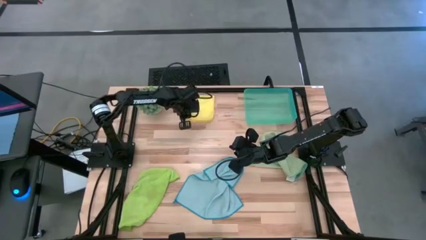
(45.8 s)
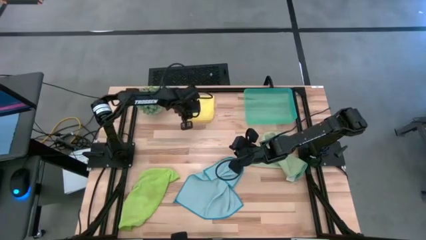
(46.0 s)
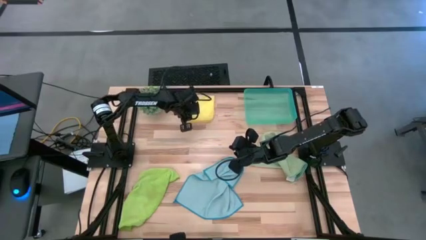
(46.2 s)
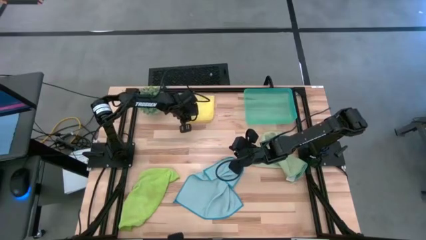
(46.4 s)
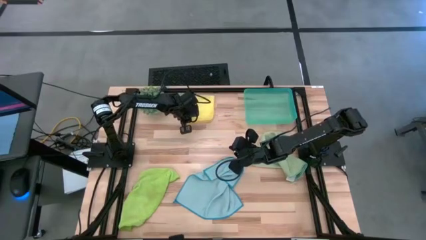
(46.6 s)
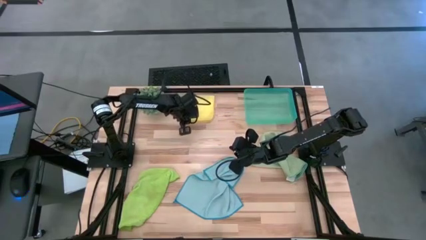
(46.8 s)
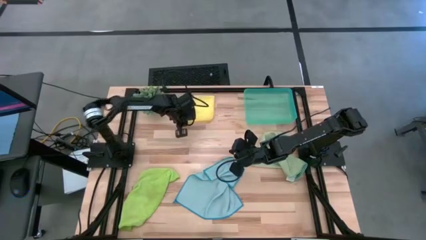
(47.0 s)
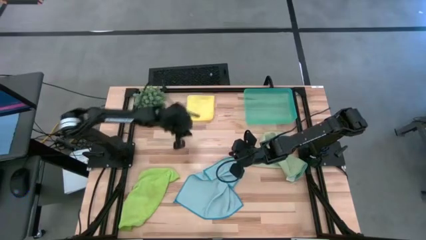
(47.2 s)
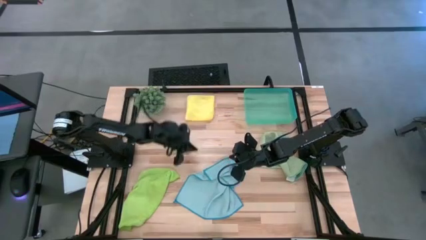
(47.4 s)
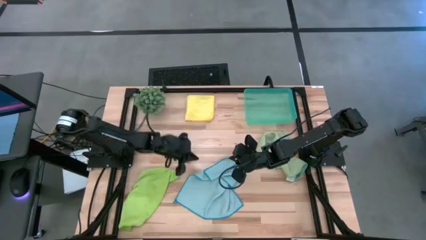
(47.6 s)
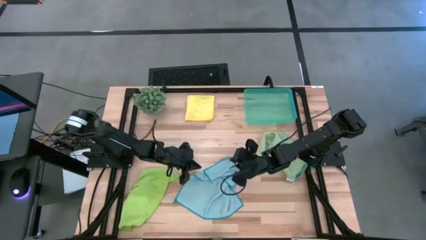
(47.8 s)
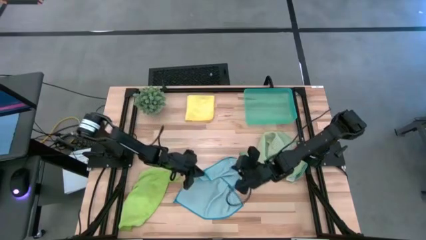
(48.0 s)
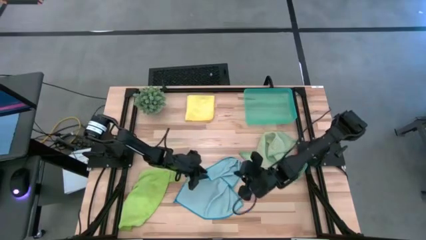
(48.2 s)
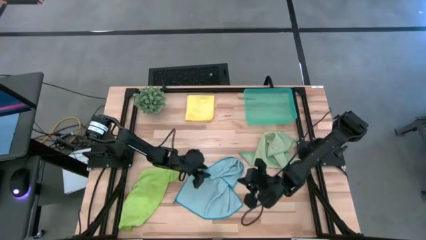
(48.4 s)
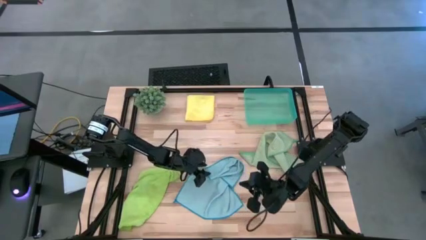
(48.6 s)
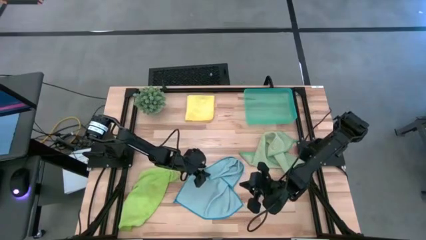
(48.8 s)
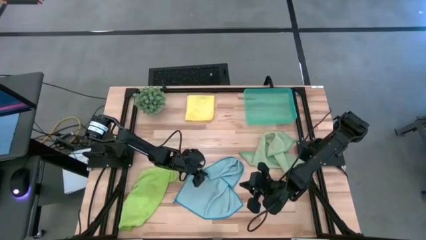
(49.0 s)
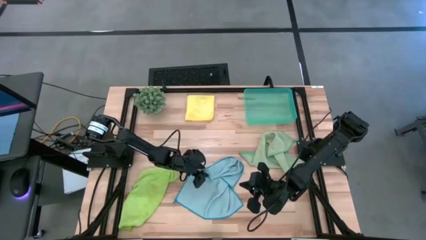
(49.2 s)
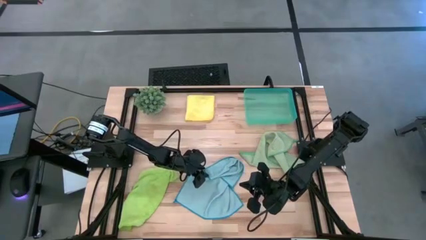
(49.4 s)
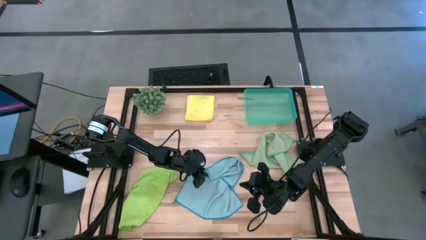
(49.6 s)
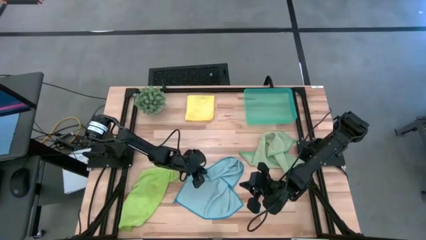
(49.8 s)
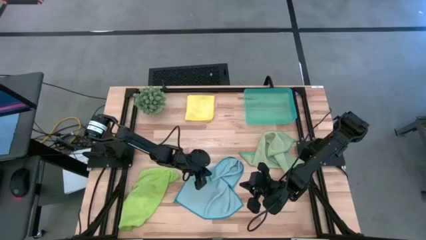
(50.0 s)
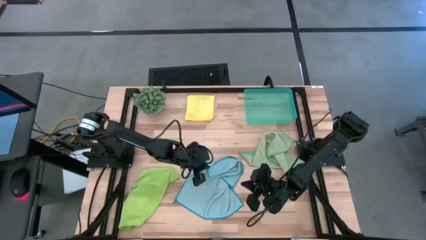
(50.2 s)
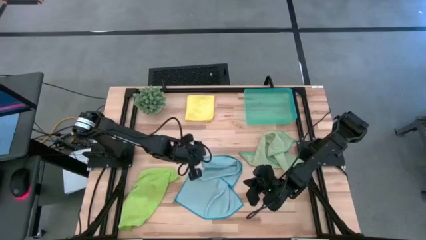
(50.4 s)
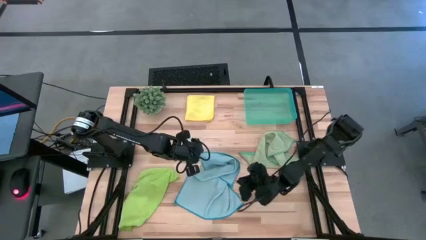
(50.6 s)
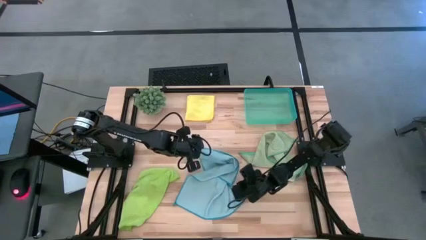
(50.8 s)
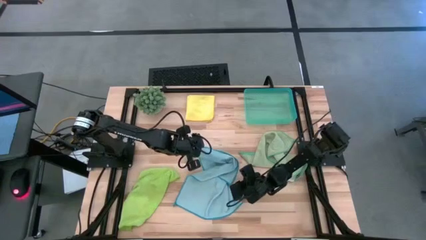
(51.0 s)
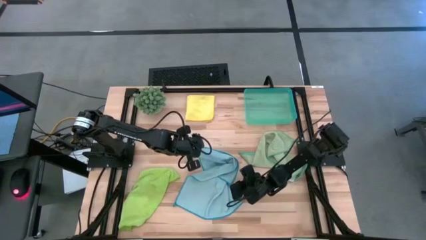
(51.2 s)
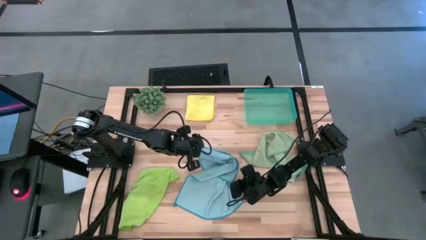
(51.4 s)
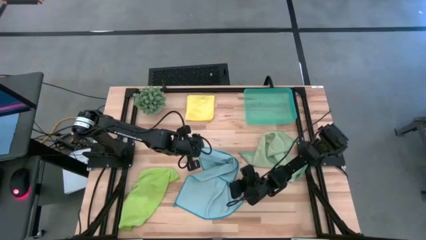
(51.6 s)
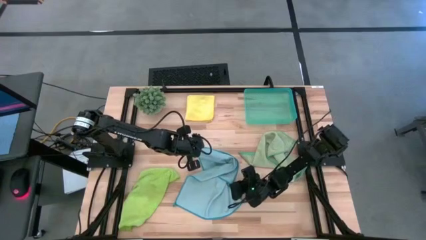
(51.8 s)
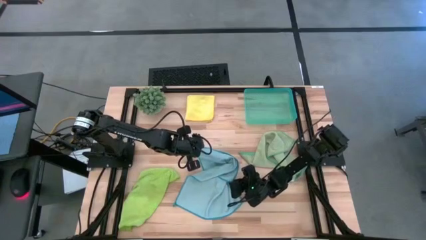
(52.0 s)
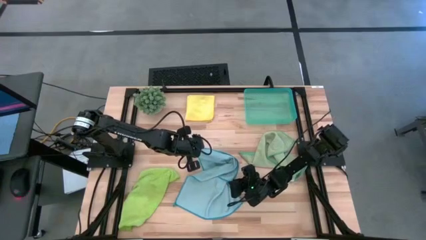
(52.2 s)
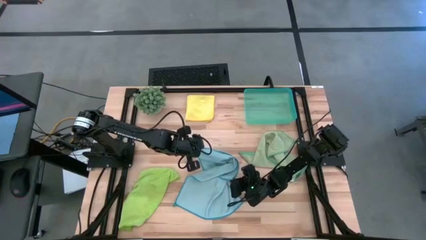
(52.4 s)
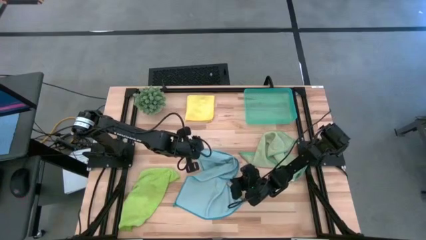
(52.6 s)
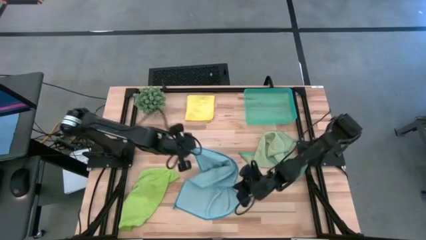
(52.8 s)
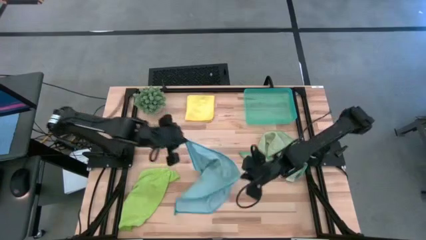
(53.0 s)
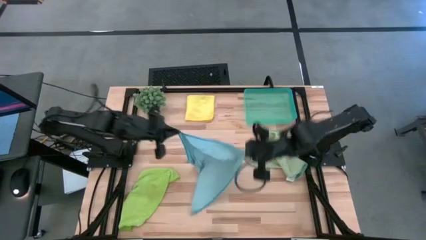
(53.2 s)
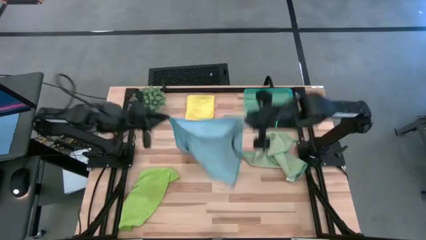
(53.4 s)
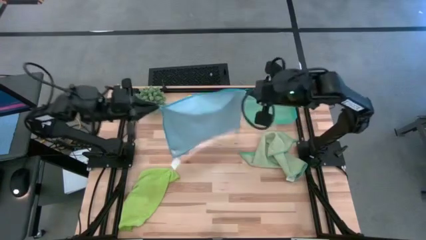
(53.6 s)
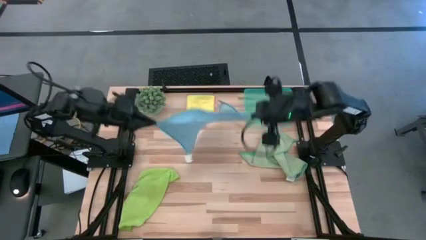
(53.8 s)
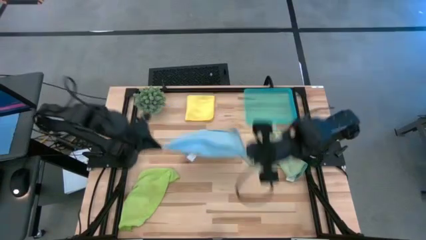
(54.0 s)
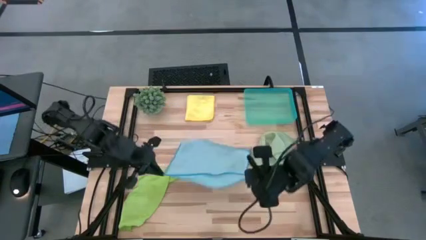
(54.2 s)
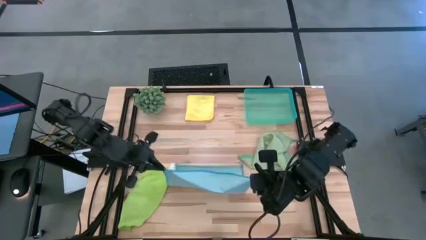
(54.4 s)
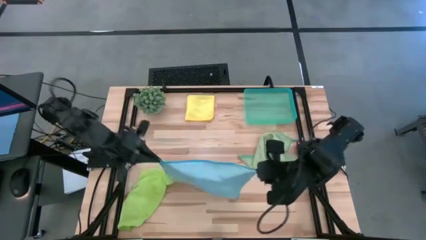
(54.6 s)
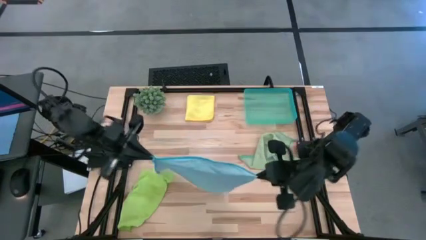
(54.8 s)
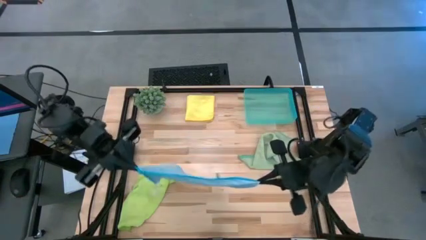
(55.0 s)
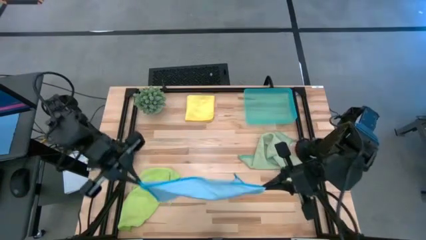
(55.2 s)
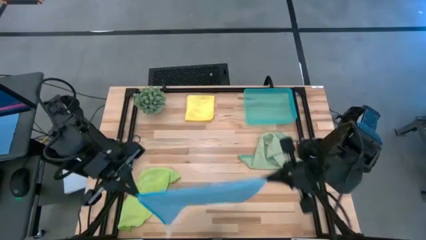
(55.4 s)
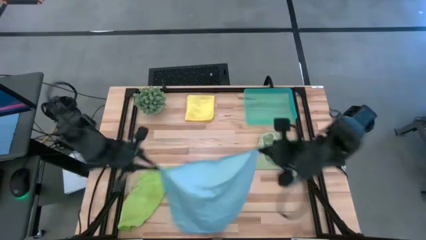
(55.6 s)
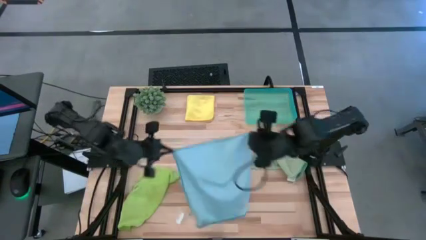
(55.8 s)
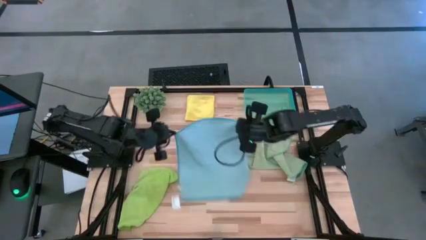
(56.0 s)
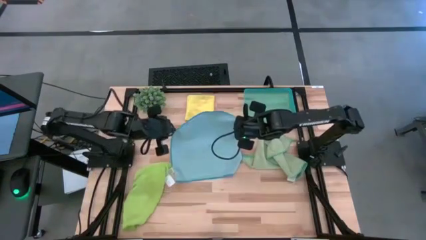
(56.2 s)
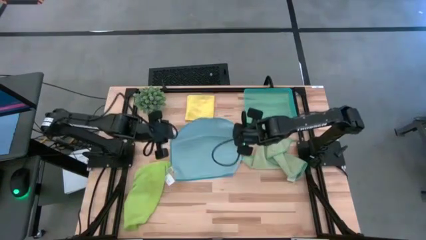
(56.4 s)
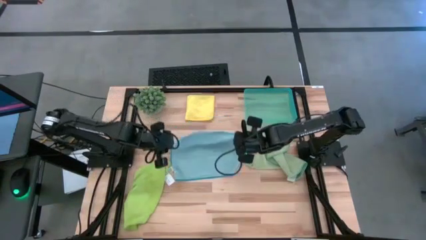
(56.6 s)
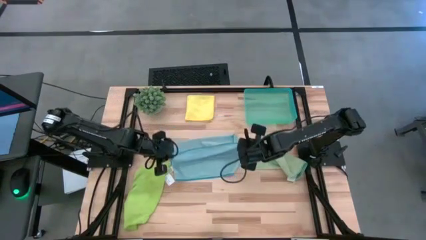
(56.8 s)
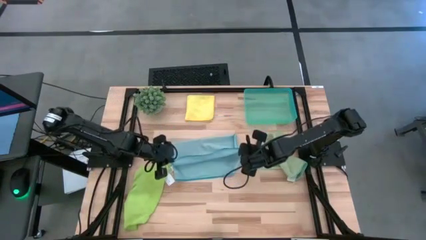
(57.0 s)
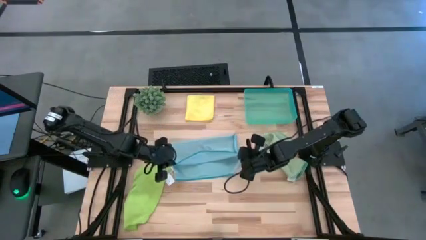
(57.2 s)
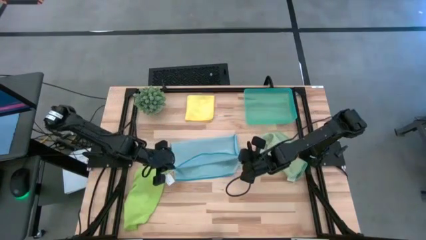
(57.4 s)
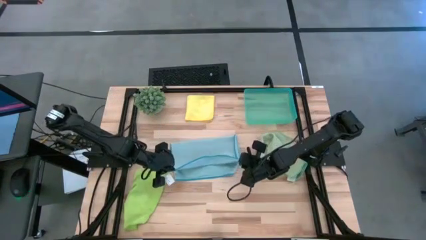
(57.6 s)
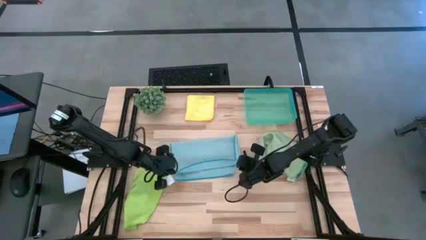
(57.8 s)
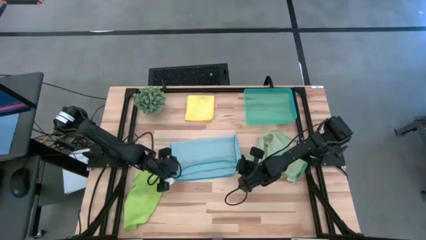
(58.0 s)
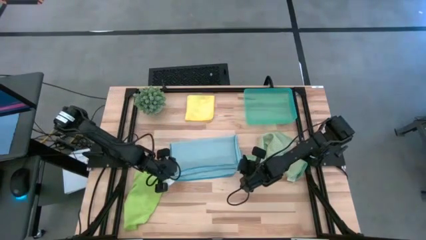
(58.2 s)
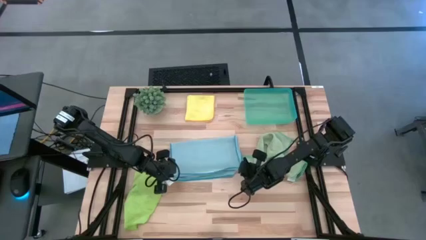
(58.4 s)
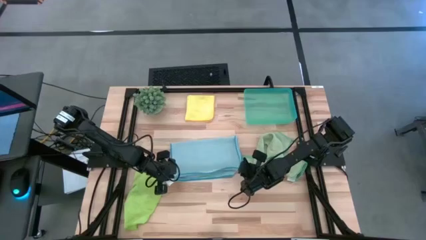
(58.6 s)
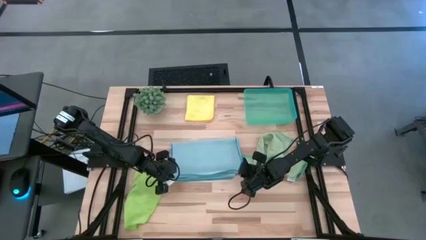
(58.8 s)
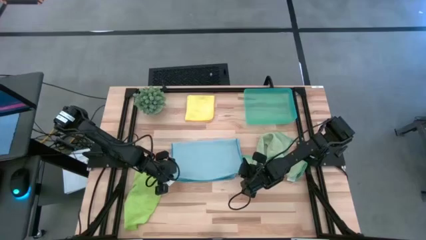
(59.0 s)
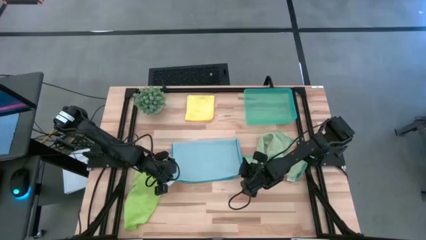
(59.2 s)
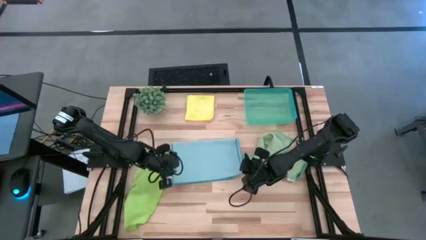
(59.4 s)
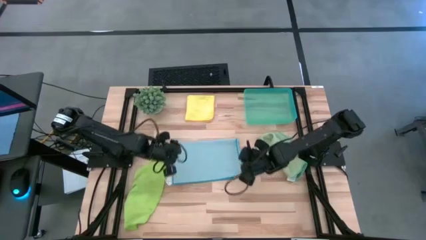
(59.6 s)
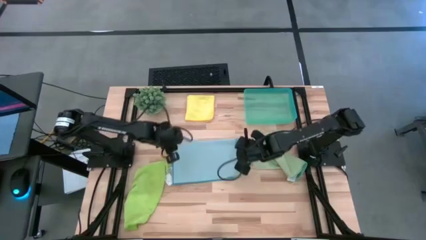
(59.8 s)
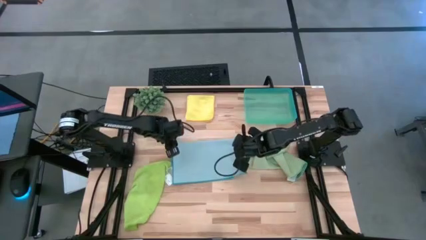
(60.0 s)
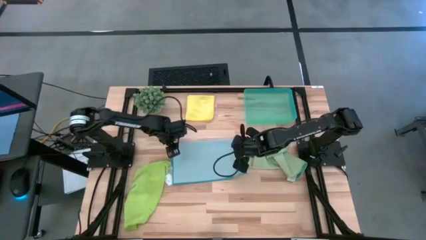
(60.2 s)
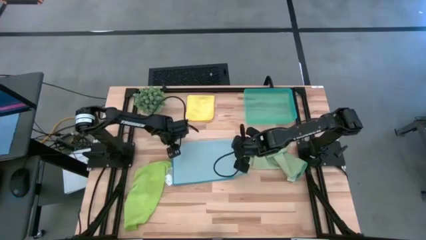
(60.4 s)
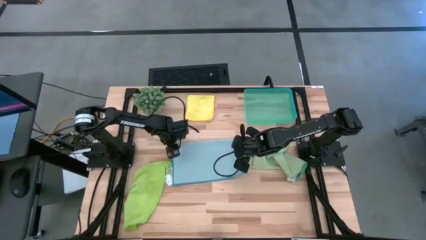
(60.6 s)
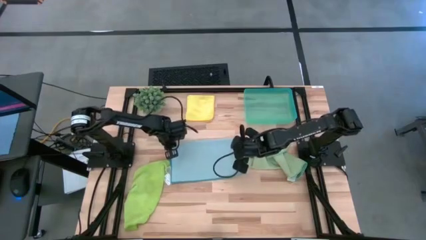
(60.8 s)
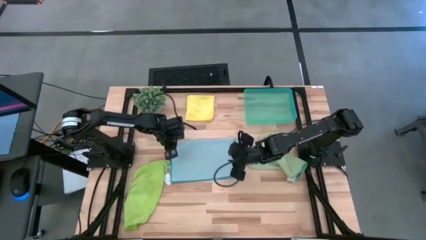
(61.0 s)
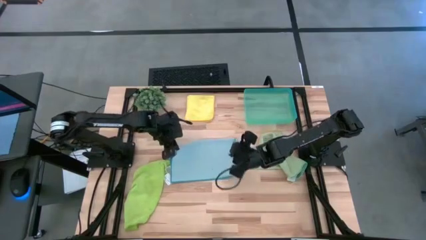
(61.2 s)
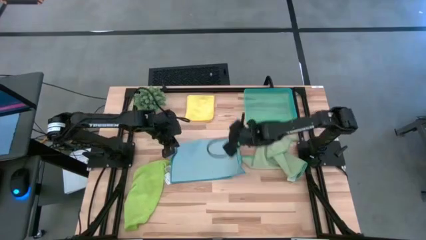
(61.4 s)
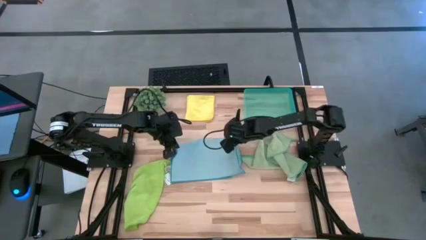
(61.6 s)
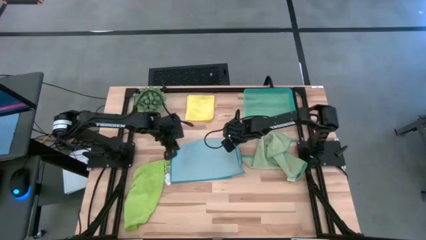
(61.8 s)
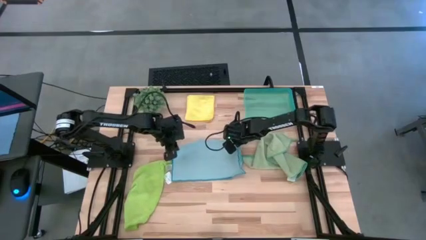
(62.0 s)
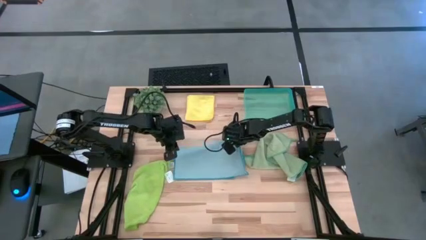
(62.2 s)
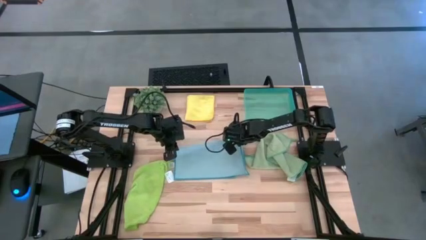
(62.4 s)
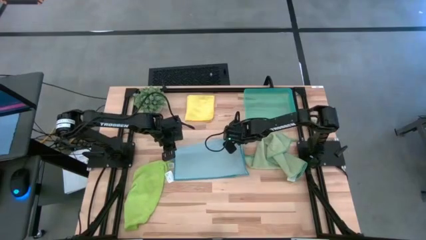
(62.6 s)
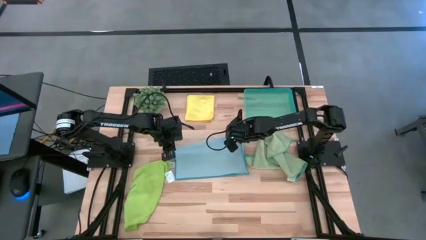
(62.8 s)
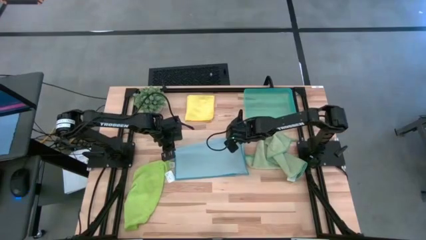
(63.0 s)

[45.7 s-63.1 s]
Task: Fold microfiber towels
Fold the blue microfiber cloth
